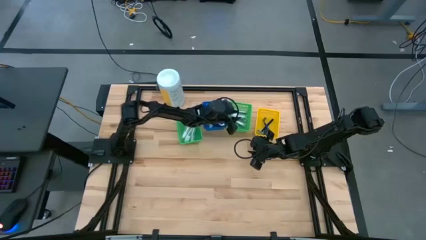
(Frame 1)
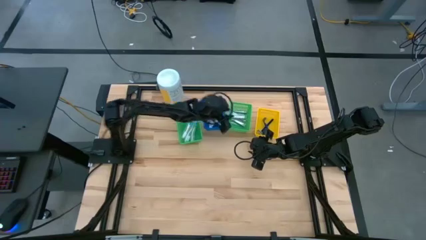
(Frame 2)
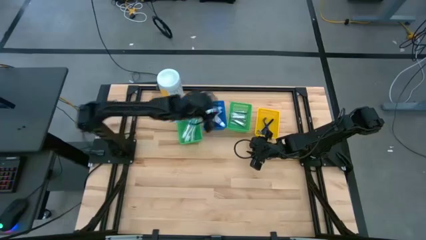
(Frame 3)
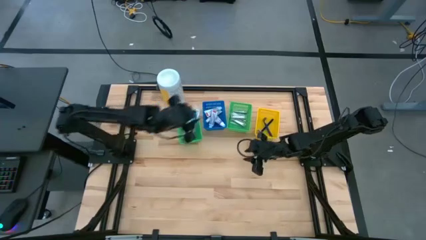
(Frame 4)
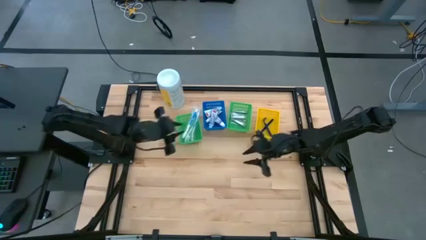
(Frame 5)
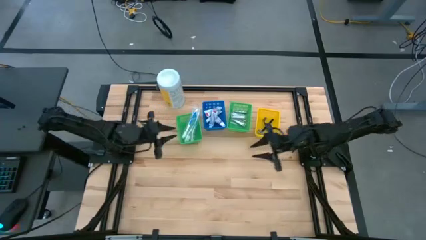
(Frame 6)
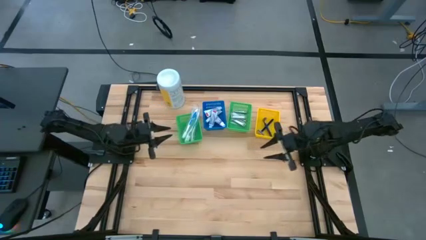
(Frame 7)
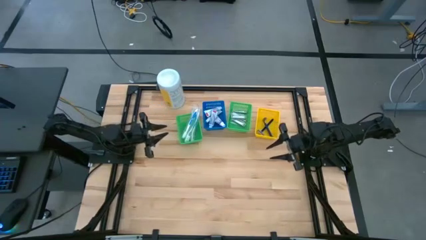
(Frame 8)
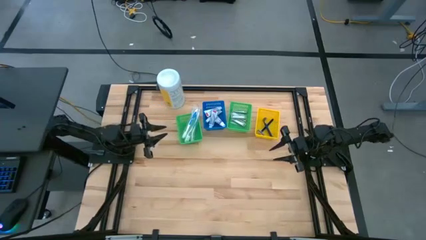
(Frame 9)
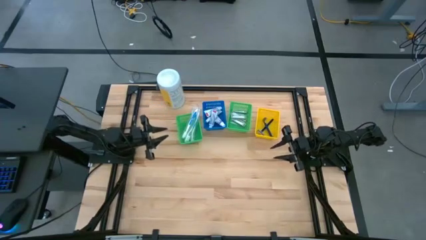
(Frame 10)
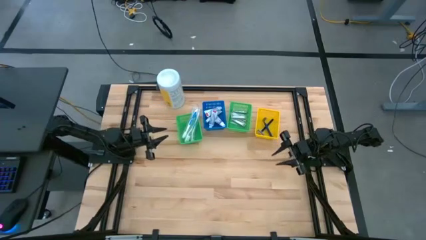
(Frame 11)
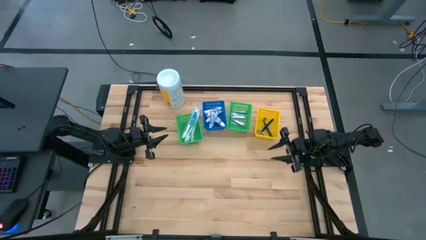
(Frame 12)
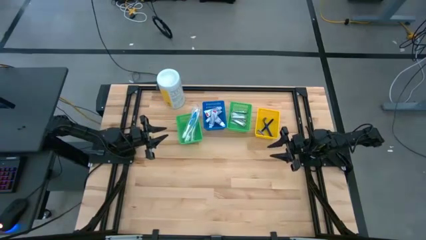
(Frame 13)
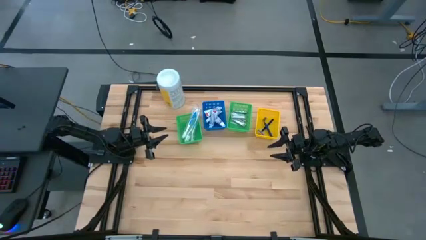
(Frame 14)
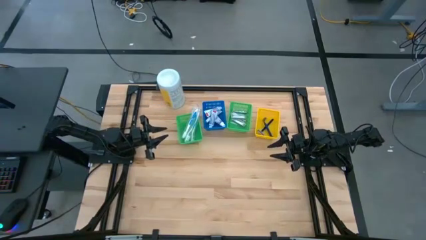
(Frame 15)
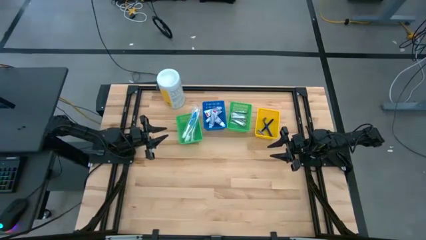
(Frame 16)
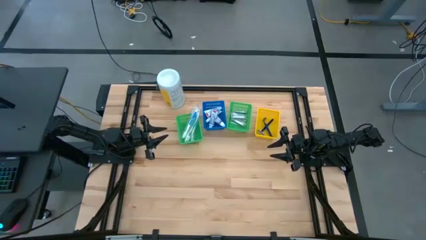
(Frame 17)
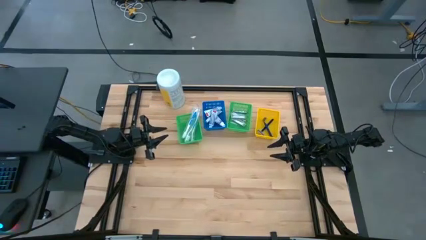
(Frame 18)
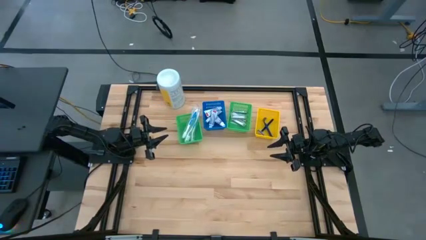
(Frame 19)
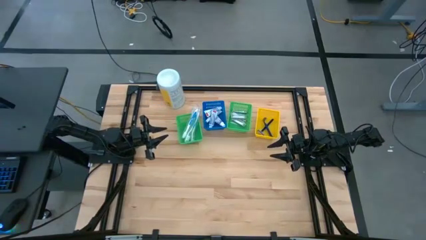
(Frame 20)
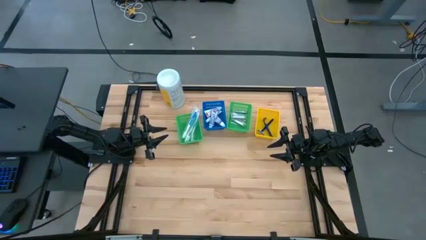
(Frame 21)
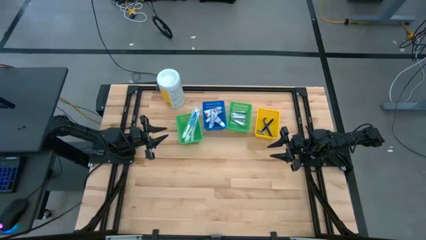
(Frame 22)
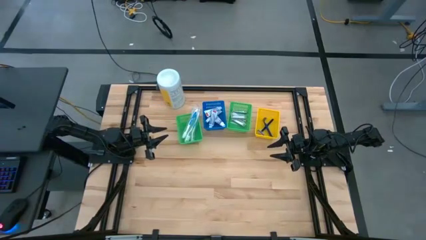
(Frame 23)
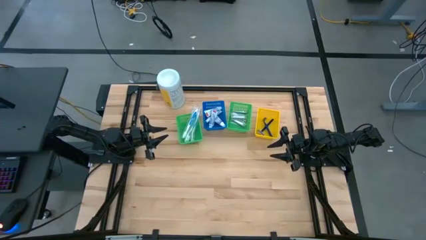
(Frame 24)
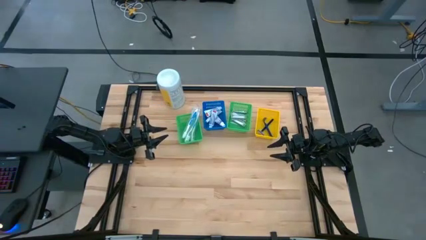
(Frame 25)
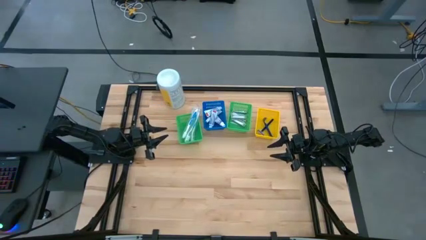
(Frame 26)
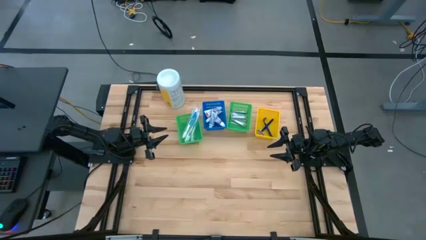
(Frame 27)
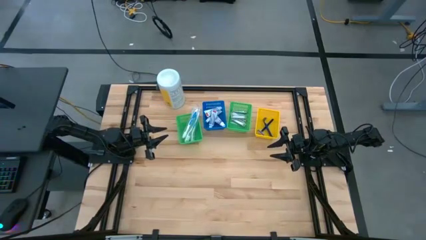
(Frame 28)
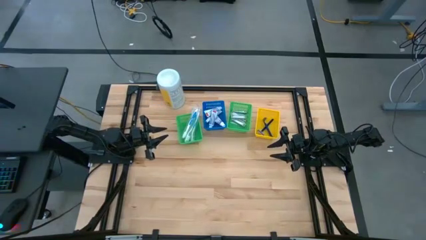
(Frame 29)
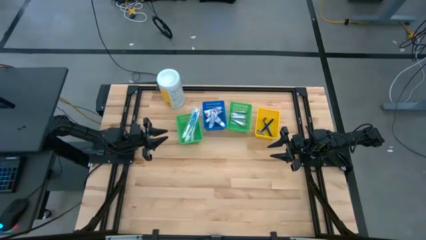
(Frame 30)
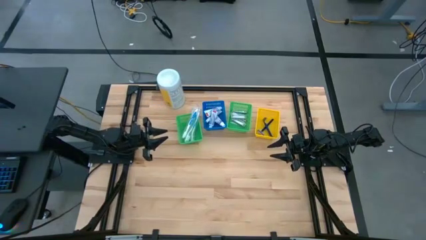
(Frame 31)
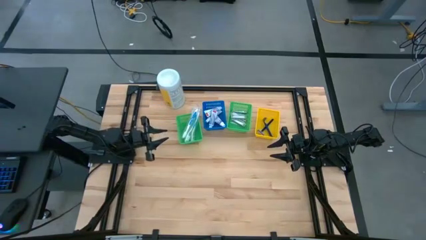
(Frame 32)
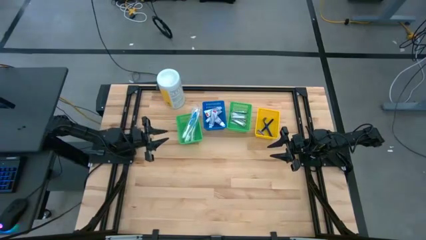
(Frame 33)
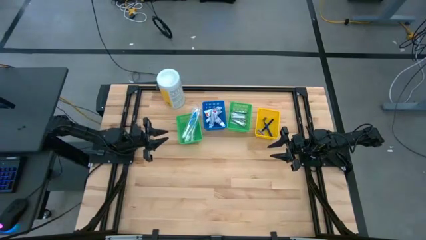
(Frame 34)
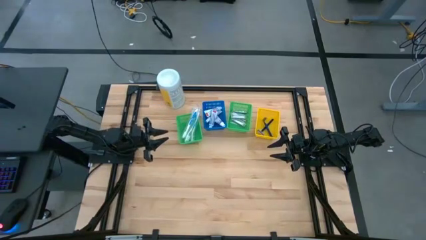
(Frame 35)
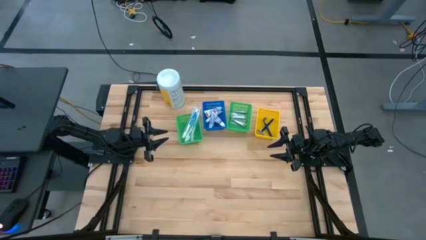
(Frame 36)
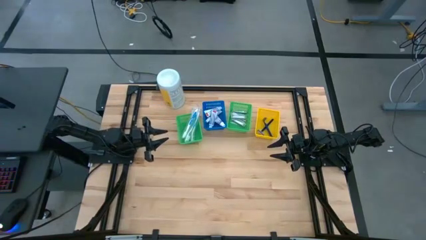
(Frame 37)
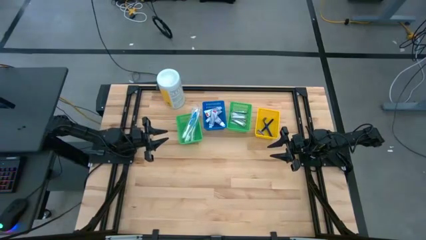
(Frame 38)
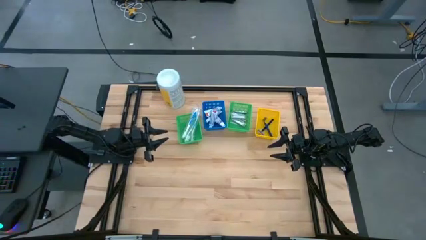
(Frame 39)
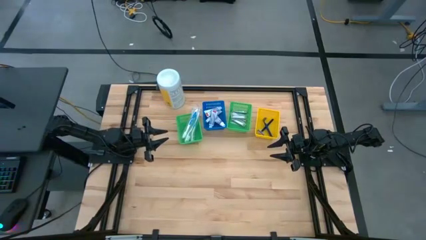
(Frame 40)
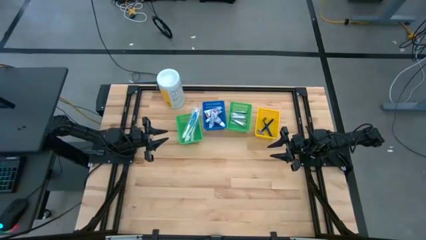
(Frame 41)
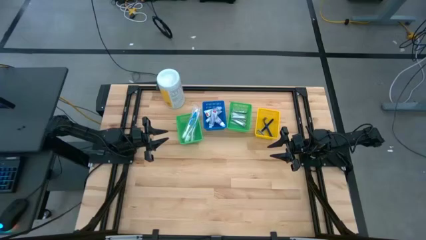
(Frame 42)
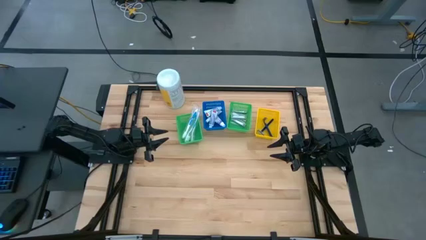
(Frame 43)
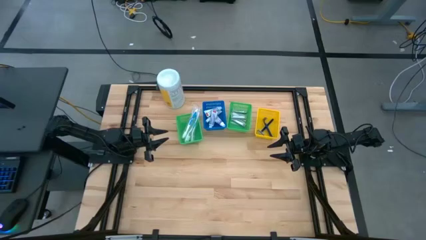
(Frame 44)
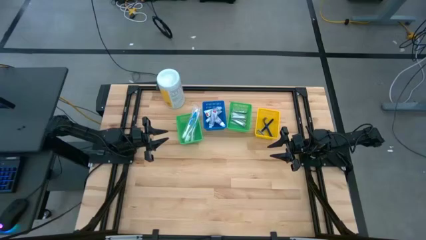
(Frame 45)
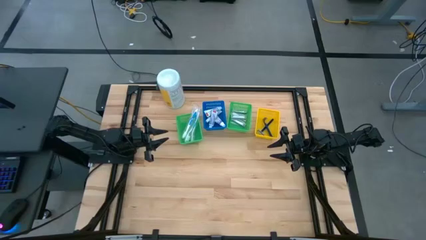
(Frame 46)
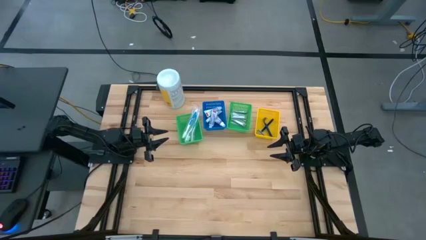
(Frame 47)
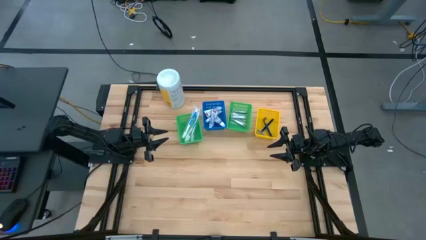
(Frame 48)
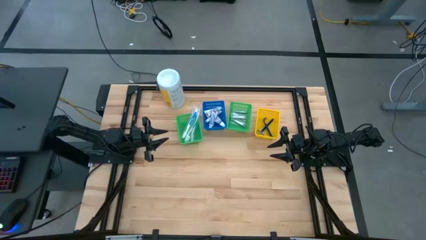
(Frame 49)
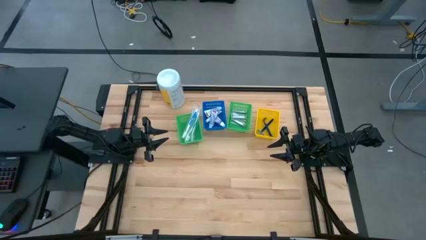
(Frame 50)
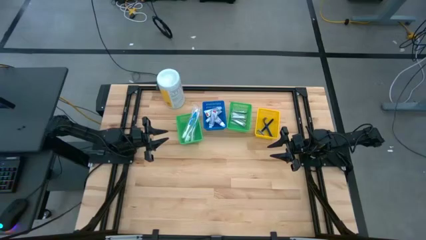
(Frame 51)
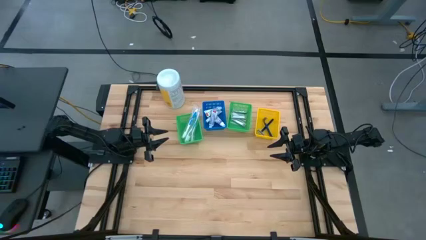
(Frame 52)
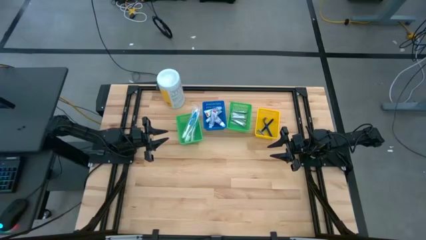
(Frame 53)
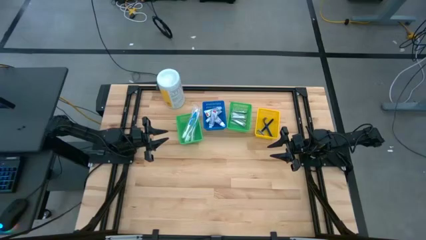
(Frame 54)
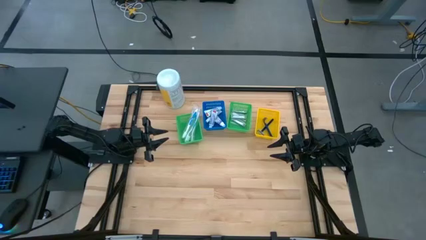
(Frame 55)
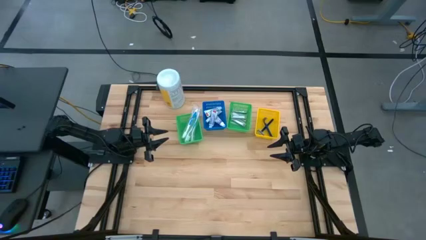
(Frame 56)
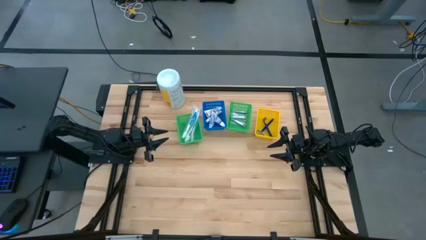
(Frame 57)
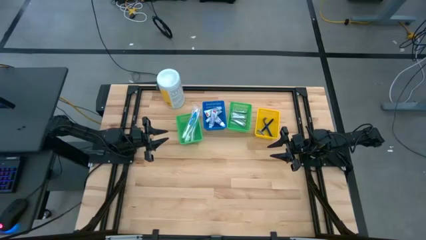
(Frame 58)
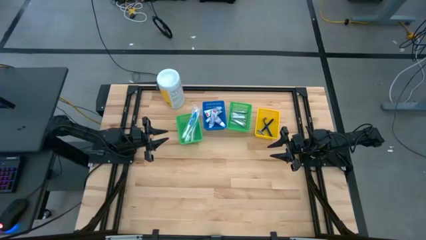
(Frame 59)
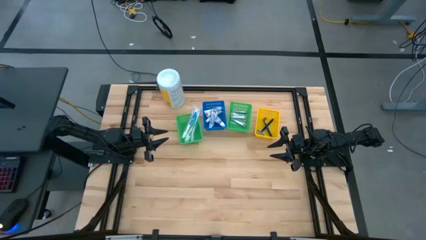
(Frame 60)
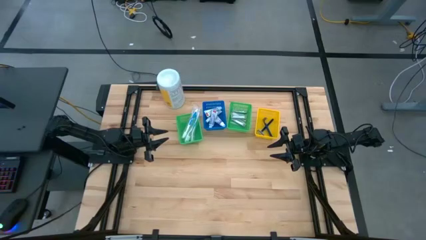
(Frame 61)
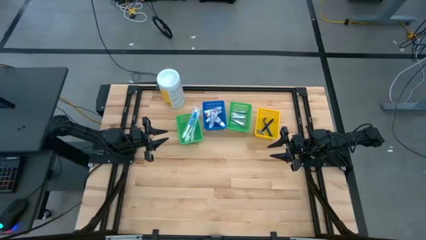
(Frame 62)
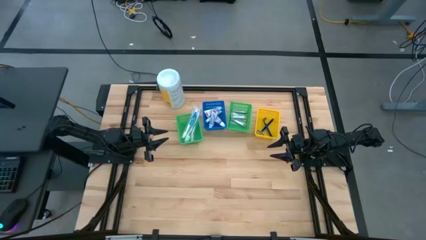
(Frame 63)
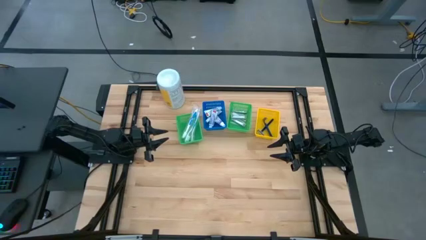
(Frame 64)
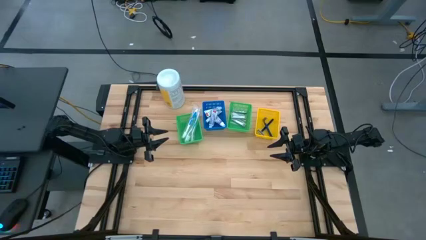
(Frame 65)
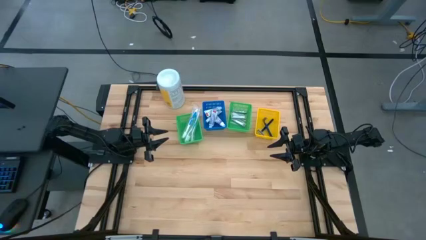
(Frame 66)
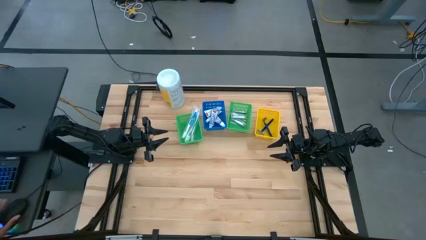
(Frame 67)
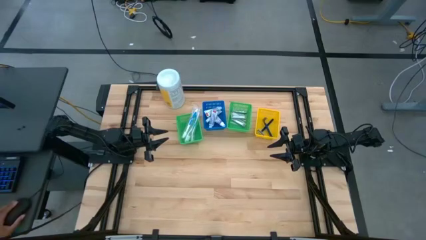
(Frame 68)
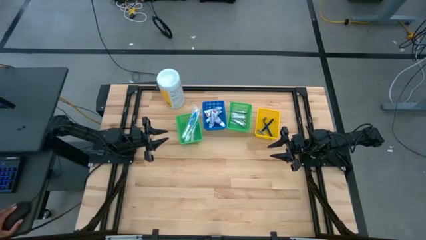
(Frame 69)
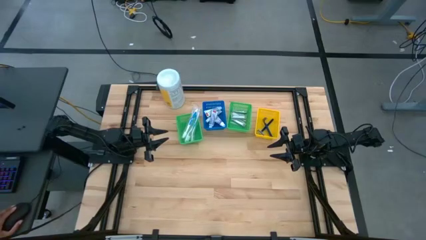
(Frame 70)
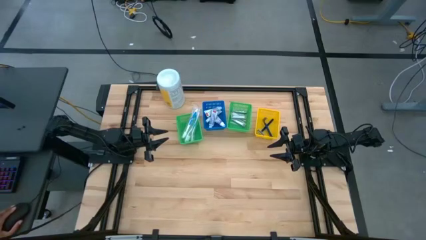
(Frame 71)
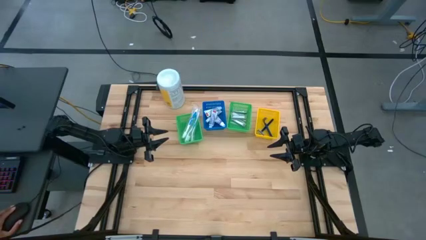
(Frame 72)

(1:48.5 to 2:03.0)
Task: Pick & Place Travel size toiletries
Return to Home Position

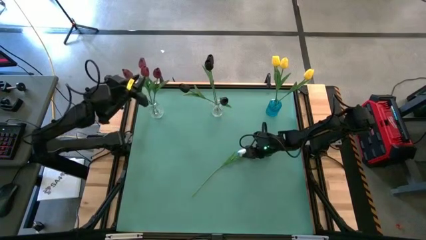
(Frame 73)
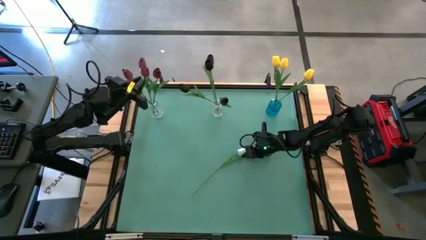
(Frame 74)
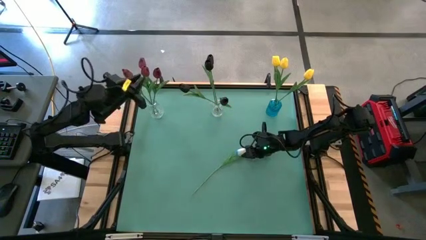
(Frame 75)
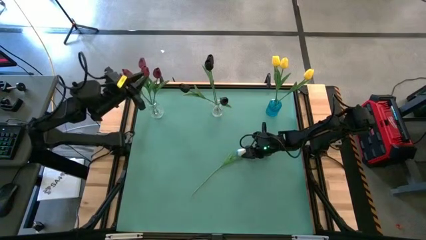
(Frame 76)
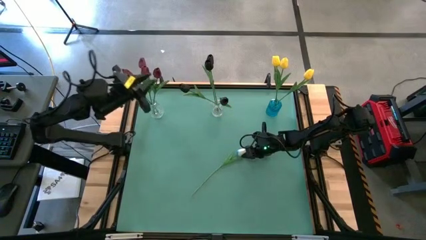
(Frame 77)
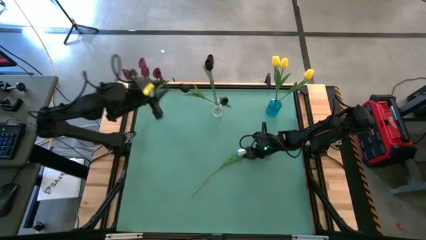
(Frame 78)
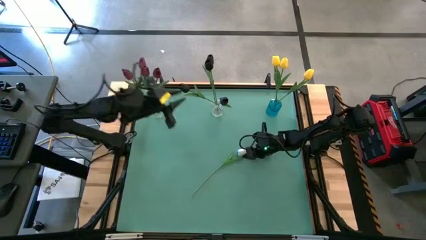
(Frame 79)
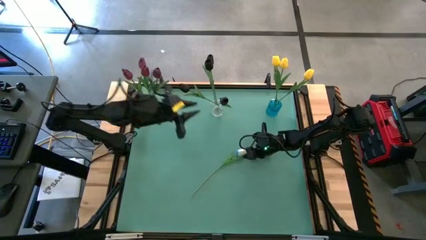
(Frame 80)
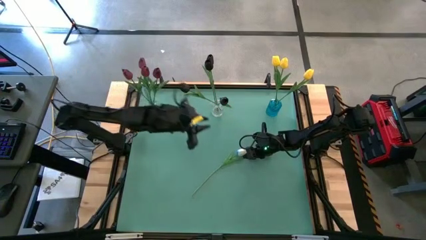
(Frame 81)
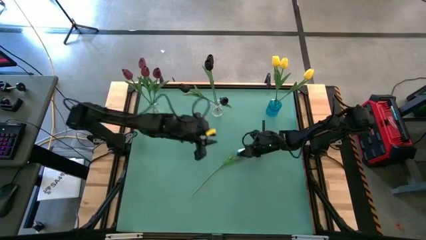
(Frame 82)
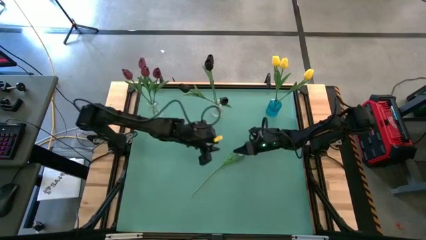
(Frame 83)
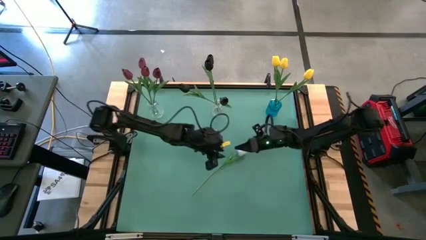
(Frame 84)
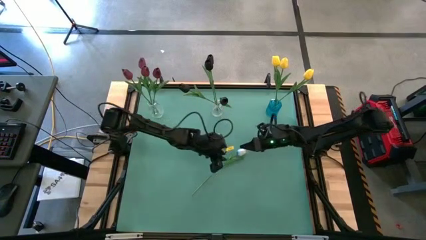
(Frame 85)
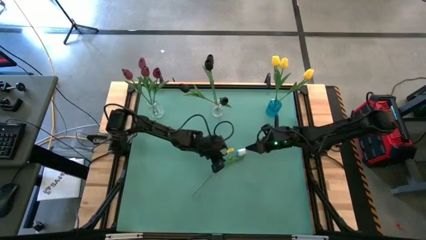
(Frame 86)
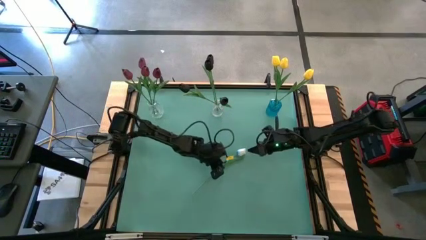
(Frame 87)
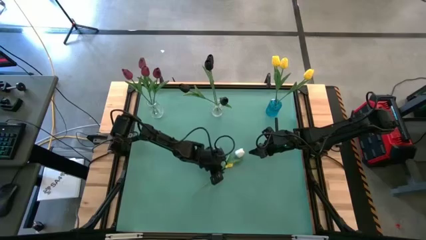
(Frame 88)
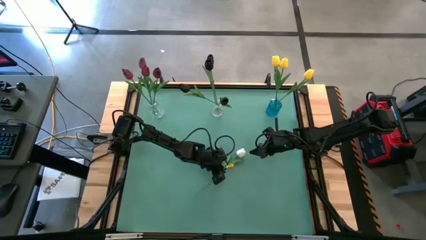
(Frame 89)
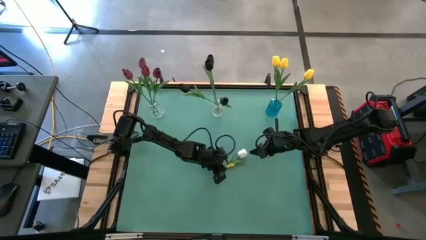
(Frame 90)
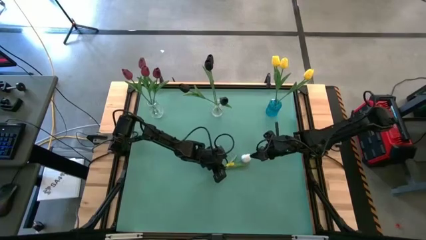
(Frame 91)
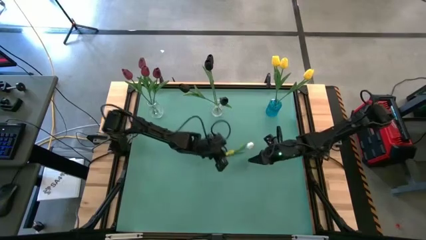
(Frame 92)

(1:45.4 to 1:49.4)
Task: Sort flowers into vase by color
Put the white tulip into the right transparent vase
